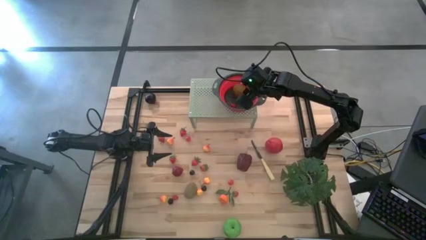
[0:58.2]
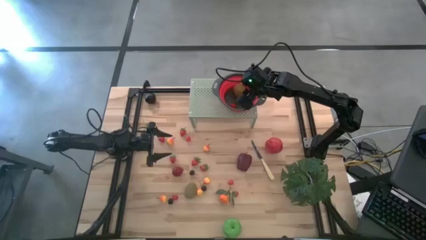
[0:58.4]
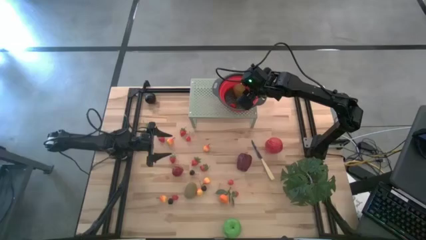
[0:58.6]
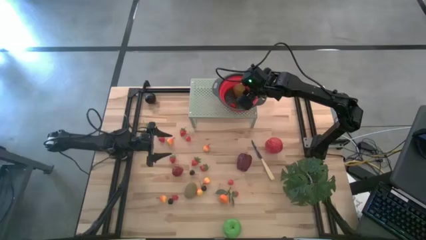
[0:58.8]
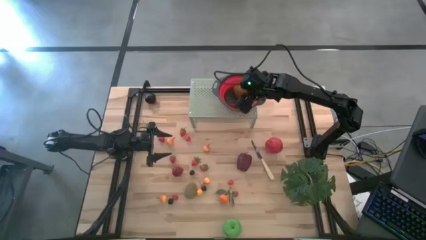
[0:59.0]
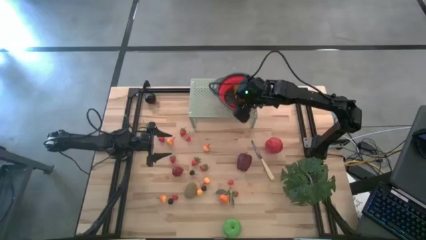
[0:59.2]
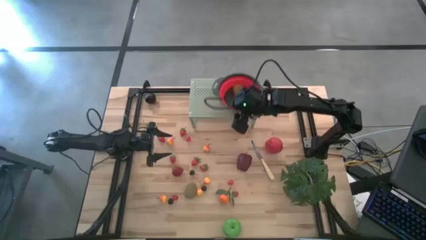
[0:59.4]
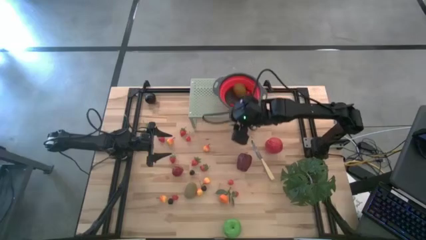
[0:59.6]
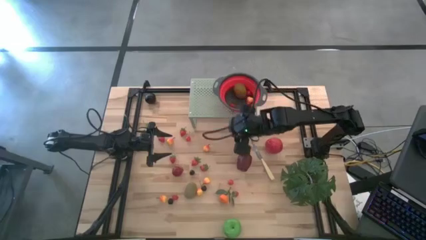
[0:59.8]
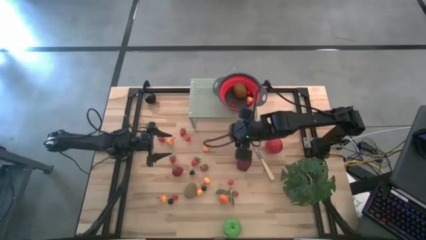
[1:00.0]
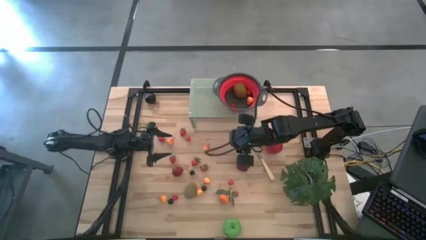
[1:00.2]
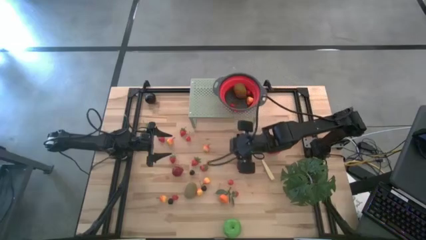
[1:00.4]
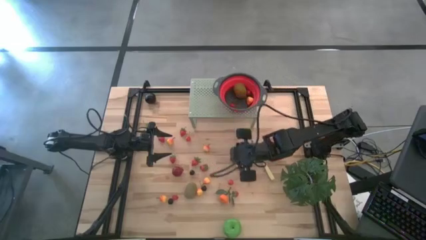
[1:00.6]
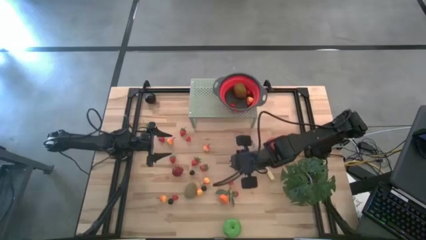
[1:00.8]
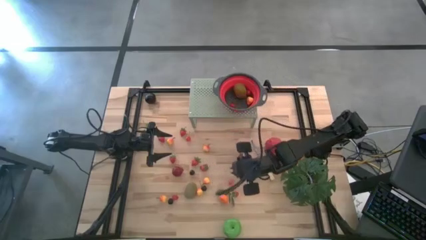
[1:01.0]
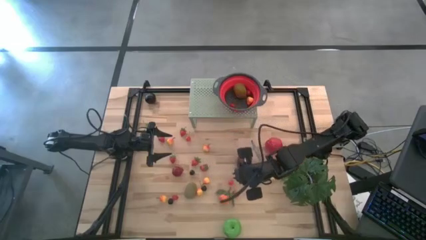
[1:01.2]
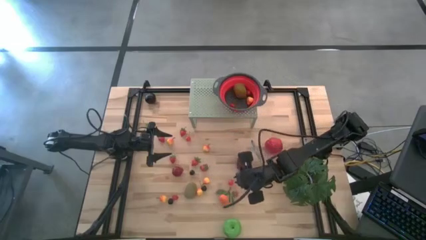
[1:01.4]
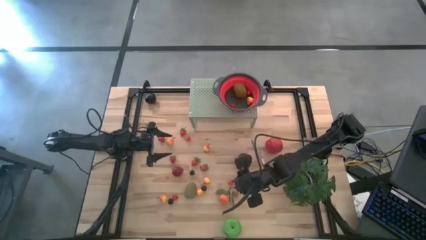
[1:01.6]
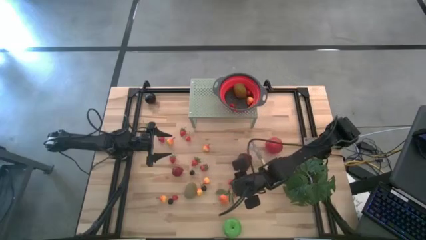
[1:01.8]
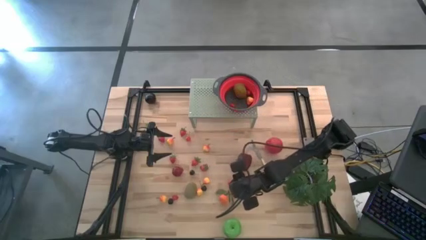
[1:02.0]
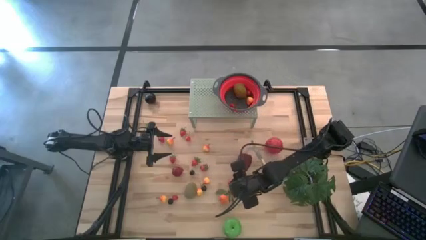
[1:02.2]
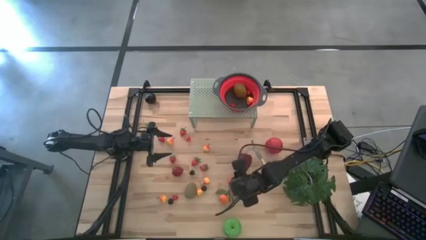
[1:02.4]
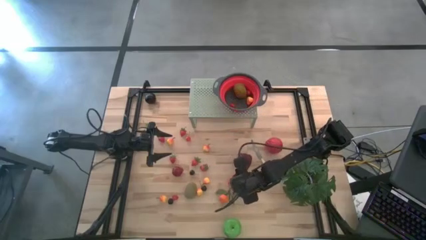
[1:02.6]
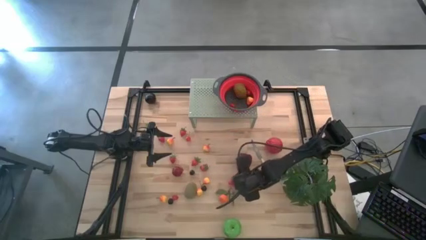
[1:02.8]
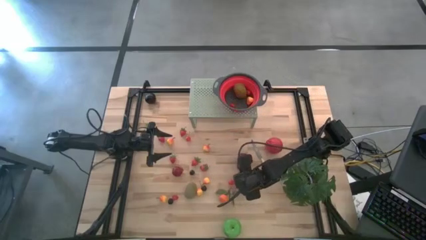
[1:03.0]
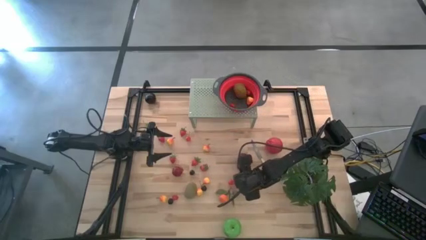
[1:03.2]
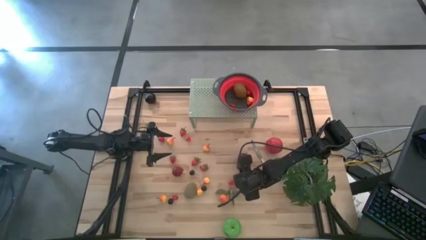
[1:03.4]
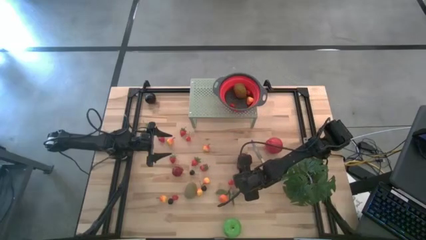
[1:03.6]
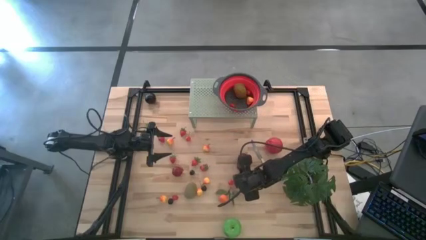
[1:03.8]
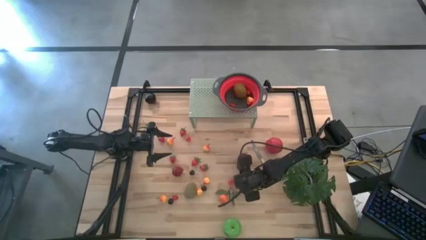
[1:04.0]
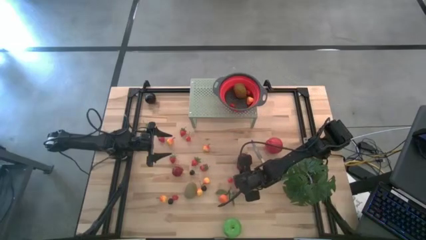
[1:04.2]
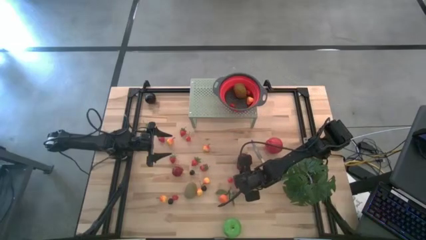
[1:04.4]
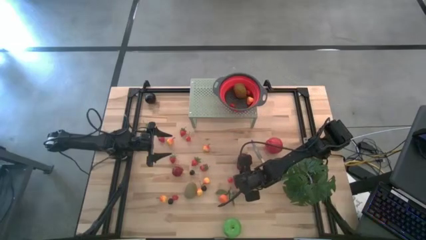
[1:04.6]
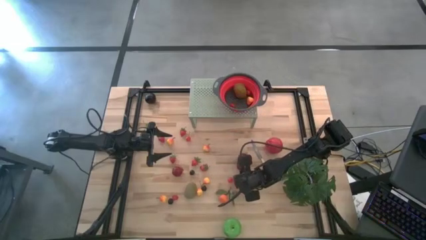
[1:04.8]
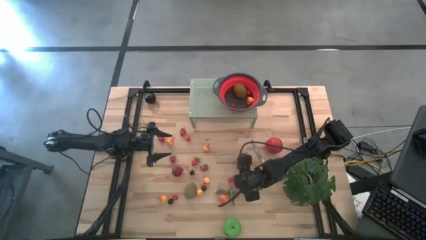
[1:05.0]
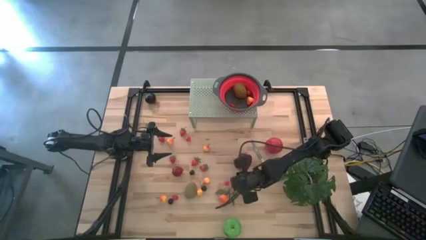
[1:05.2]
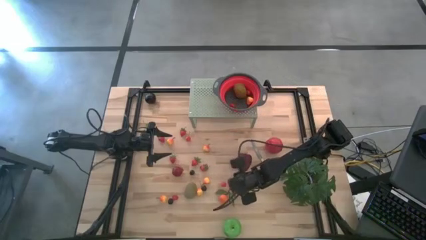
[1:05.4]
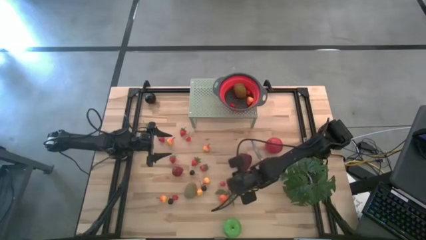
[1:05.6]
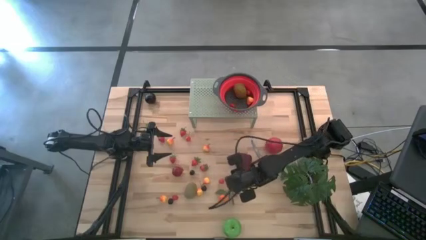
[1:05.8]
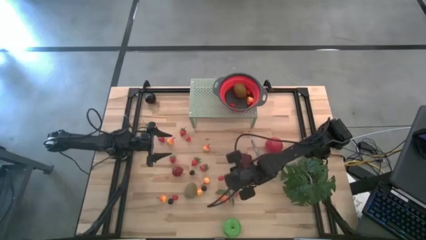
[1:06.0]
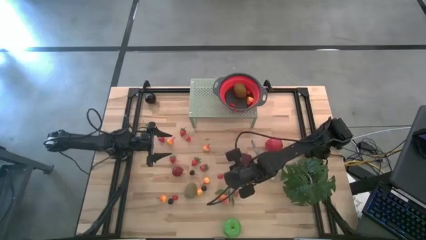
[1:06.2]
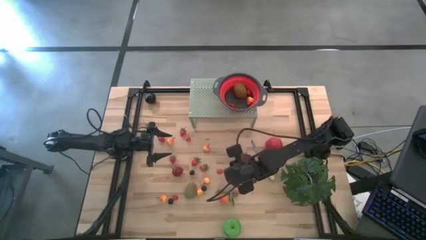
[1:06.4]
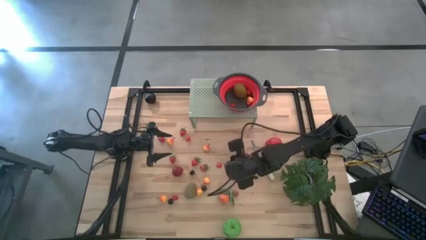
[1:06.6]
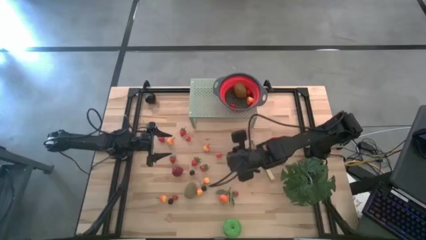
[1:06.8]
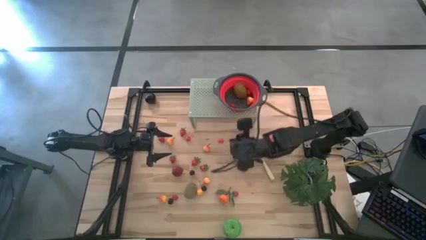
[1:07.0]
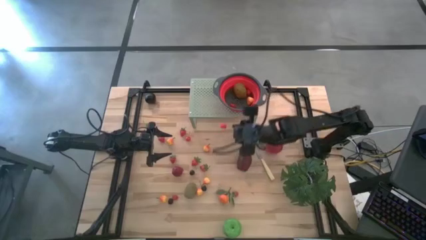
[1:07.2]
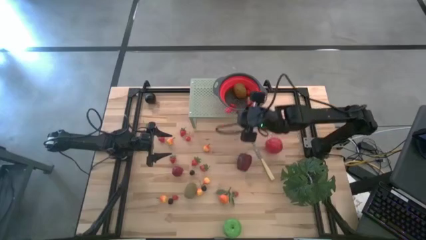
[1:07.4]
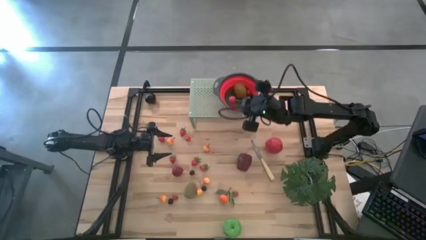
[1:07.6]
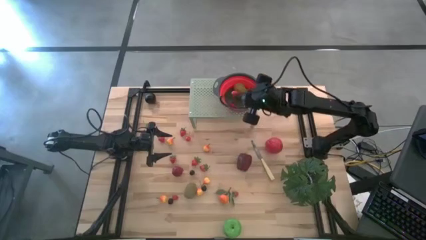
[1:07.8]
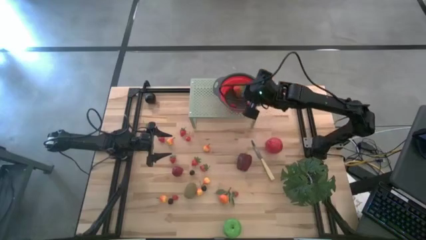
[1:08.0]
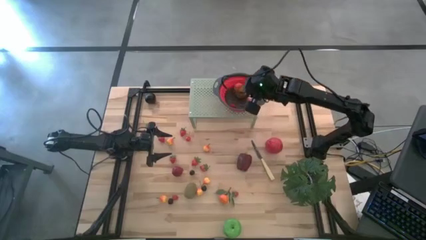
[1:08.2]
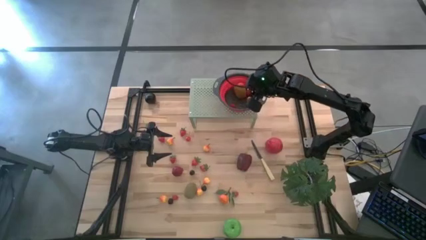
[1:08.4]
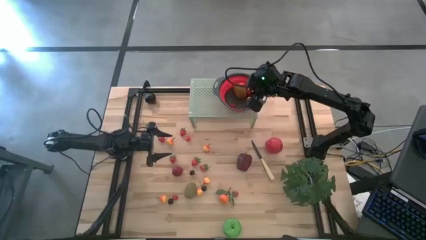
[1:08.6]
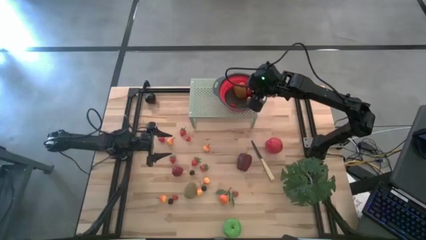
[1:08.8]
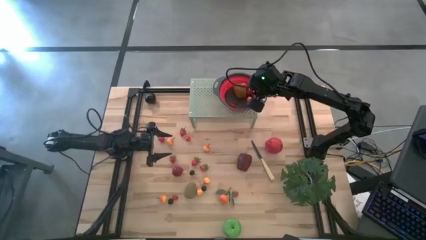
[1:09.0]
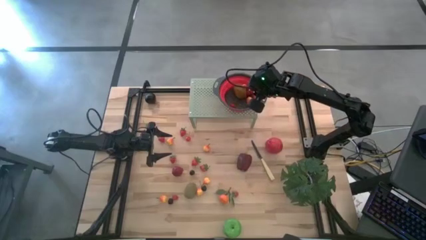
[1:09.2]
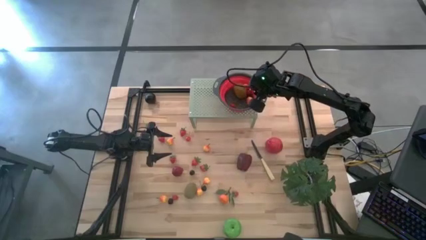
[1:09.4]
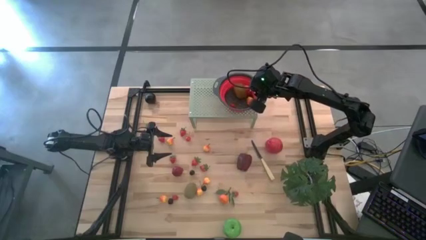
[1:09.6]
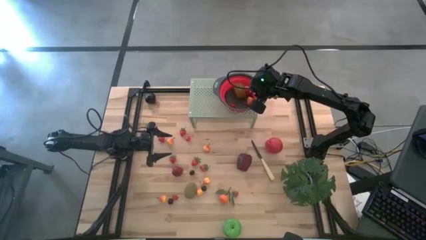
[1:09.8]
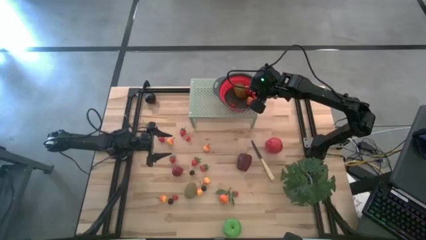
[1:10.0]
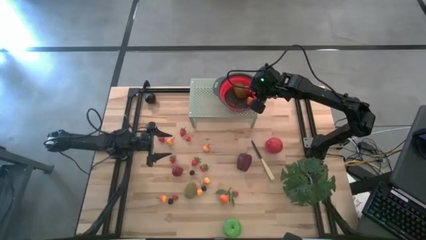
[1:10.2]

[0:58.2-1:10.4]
Task: Pick & Place Fruit
Put the red cherry into the black strainer bowl on the shelf

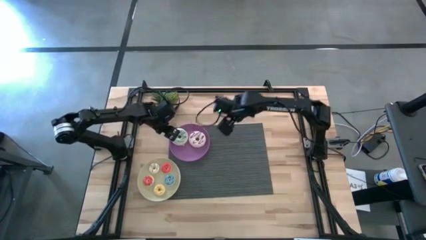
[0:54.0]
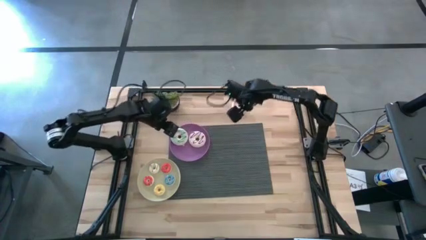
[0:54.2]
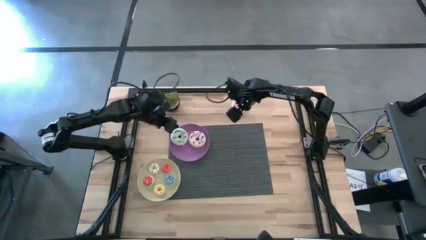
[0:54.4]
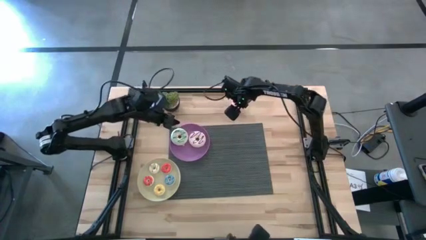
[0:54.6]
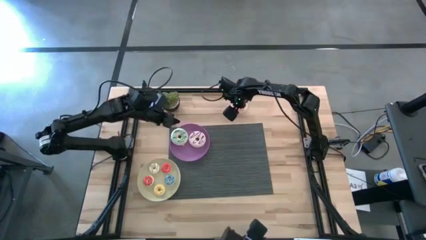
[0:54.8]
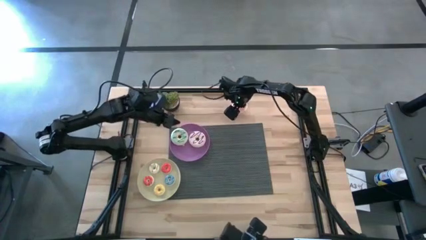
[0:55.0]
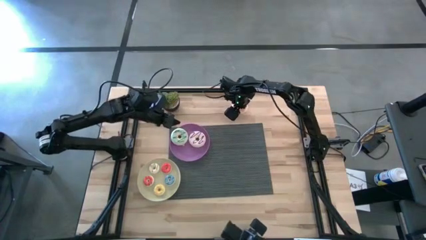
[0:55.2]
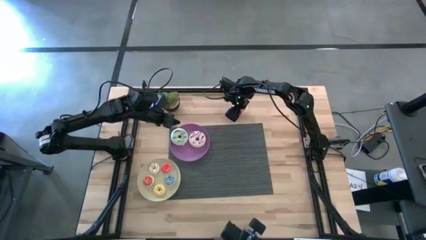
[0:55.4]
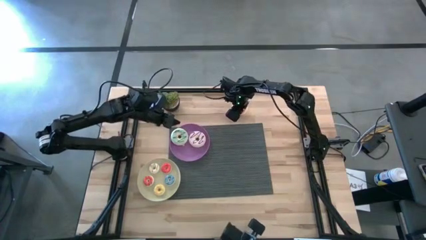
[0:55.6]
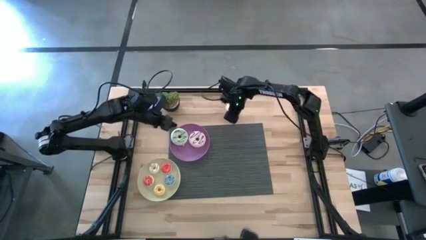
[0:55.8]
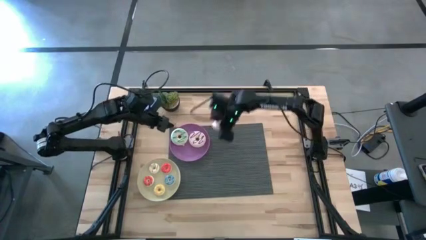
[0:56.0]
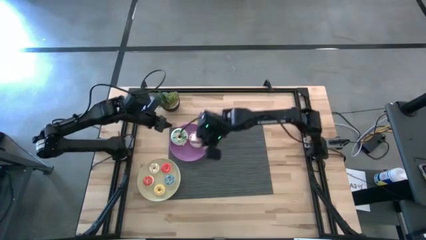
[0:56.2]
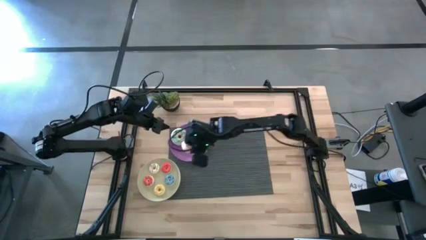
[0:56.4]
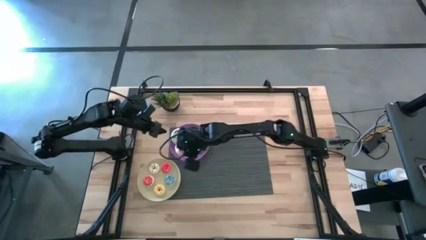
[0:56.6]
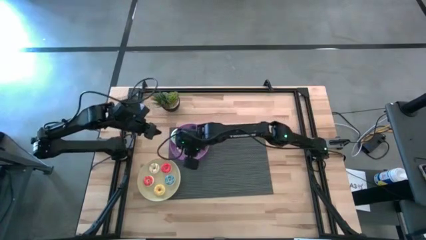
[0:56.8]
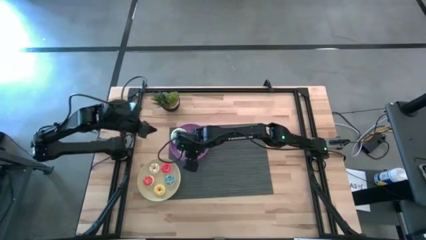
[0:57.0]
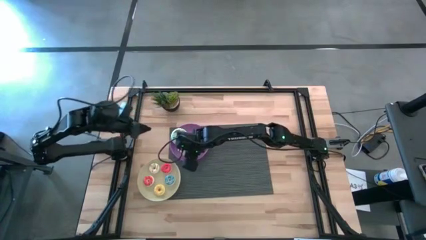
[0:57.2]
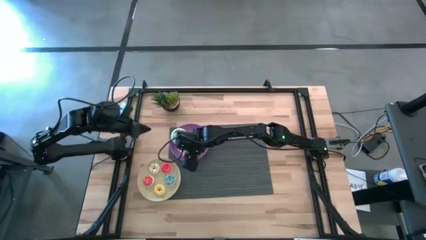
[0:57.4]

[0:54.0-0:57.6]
Task: Pick & Place donuts
Put the big pink donut on the purple plate
